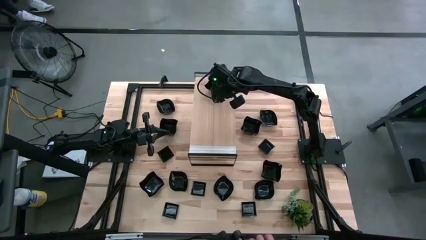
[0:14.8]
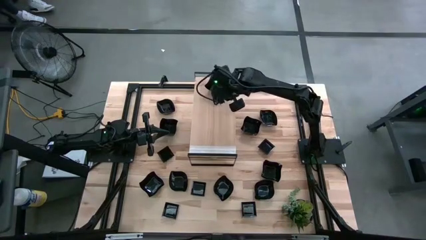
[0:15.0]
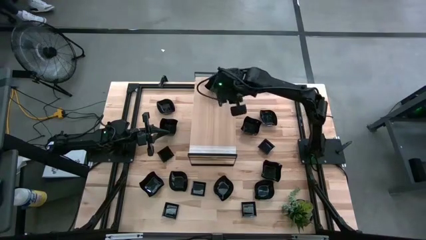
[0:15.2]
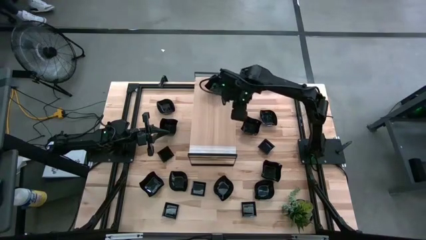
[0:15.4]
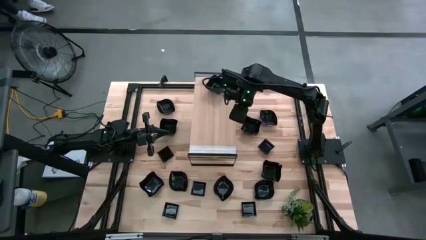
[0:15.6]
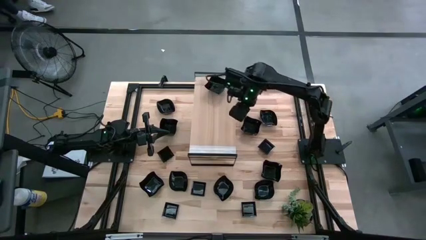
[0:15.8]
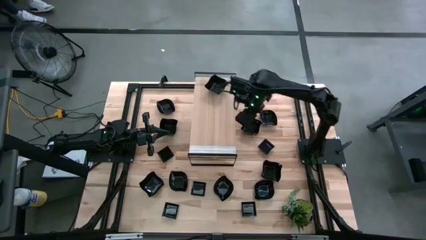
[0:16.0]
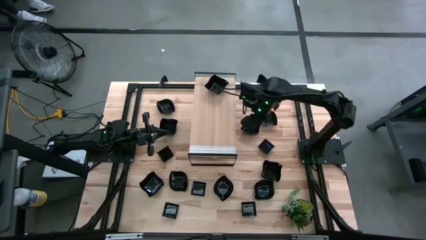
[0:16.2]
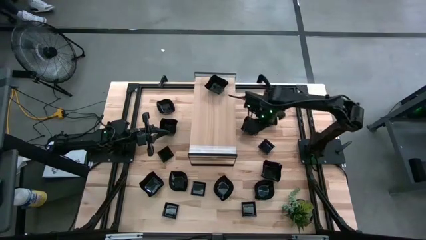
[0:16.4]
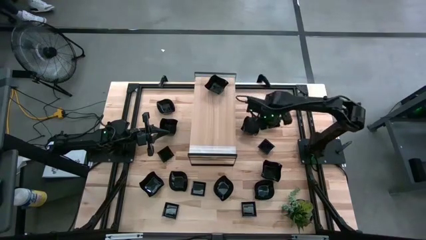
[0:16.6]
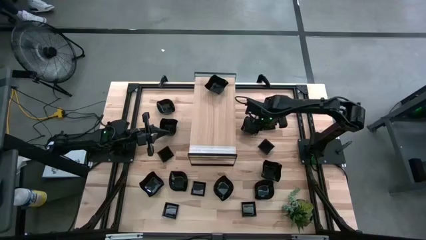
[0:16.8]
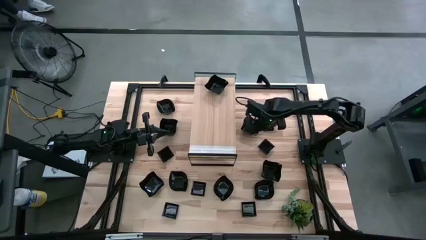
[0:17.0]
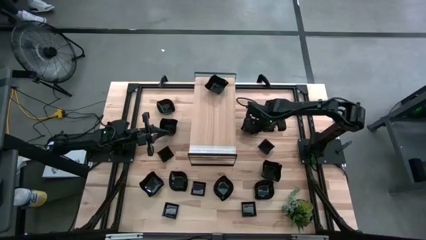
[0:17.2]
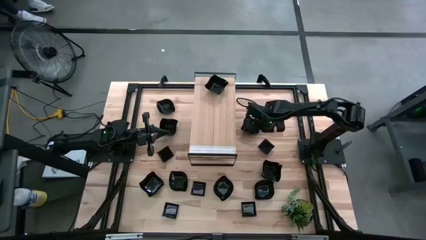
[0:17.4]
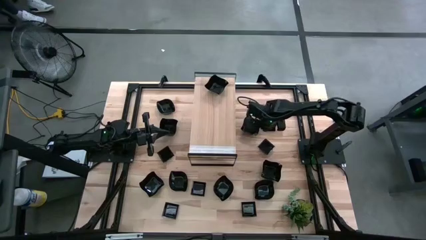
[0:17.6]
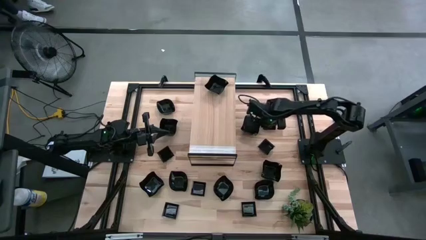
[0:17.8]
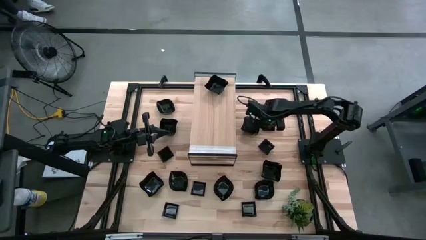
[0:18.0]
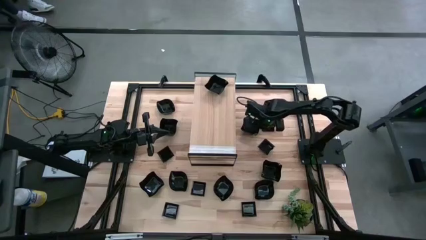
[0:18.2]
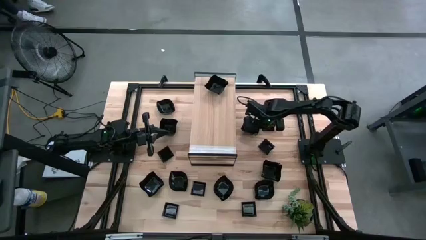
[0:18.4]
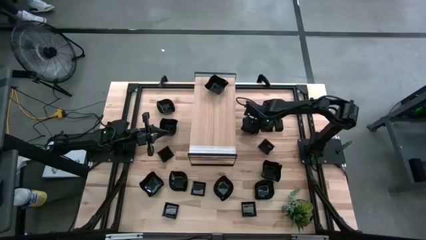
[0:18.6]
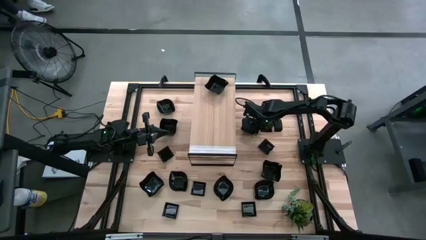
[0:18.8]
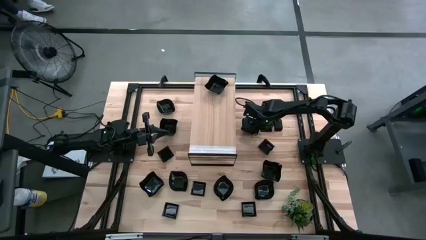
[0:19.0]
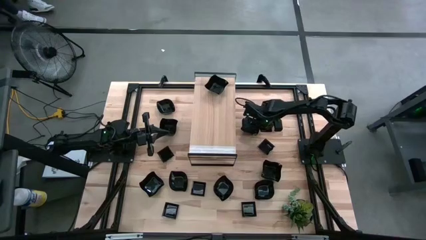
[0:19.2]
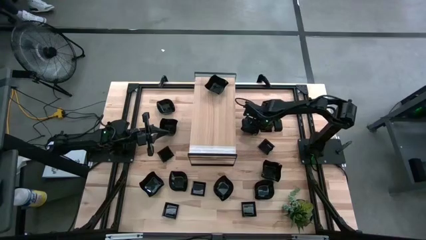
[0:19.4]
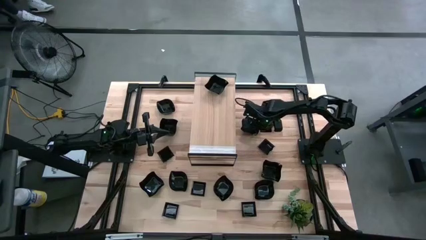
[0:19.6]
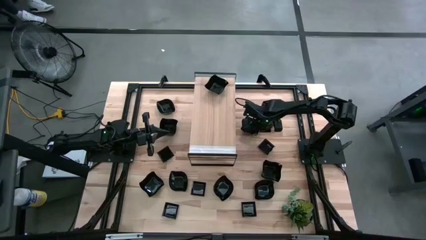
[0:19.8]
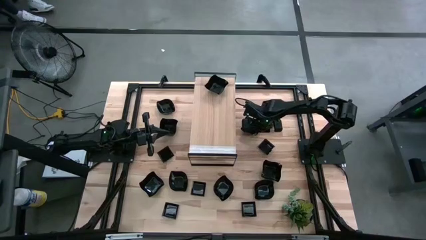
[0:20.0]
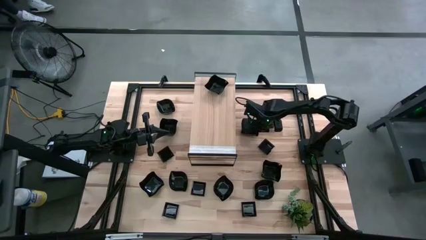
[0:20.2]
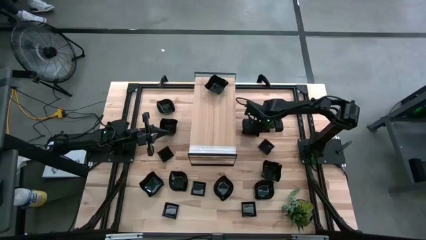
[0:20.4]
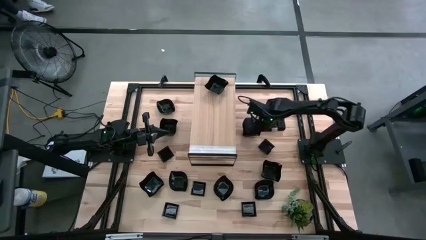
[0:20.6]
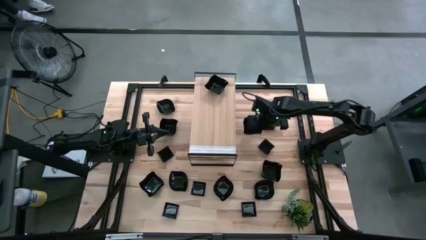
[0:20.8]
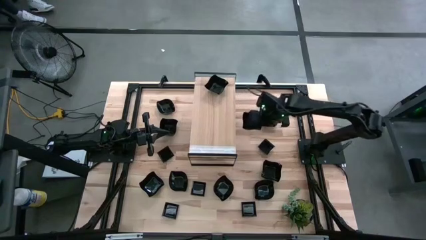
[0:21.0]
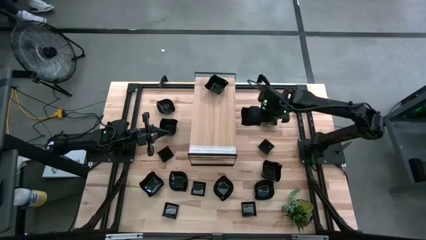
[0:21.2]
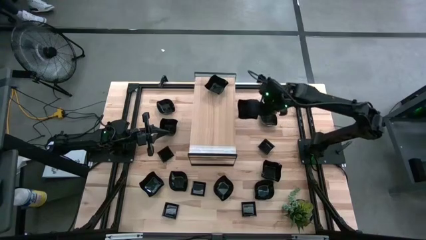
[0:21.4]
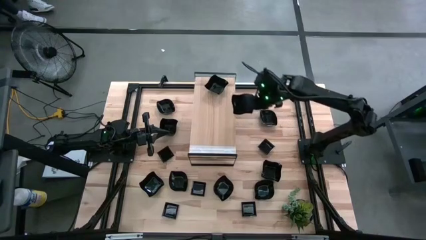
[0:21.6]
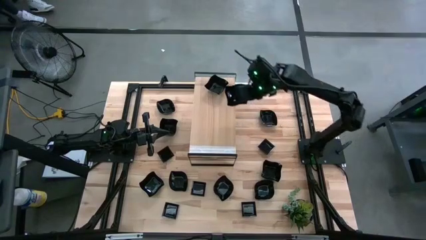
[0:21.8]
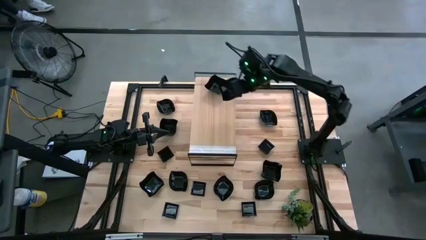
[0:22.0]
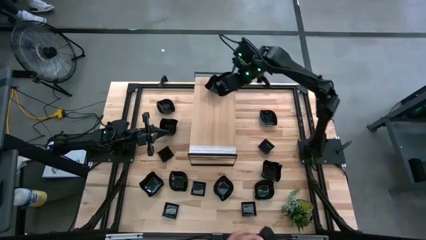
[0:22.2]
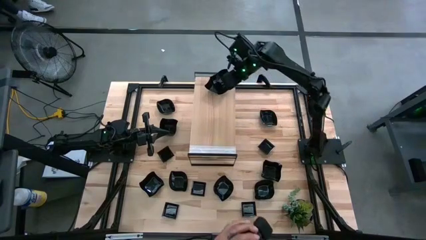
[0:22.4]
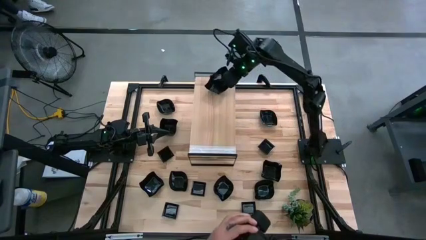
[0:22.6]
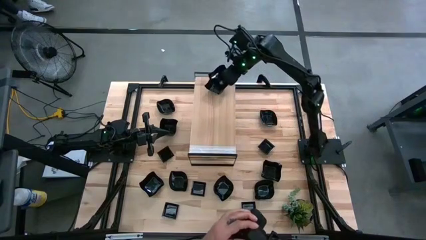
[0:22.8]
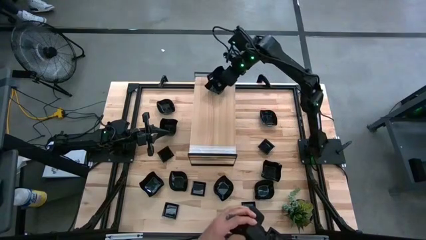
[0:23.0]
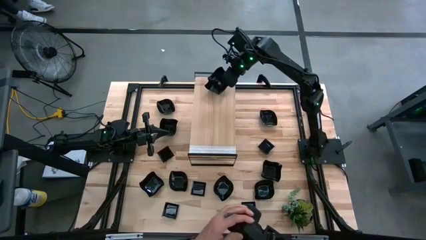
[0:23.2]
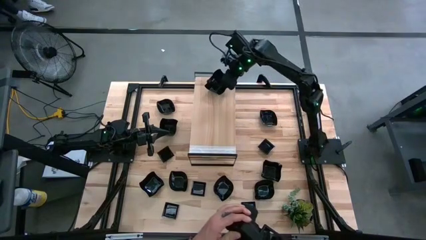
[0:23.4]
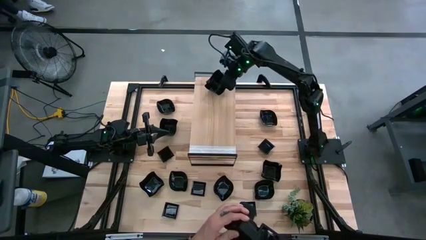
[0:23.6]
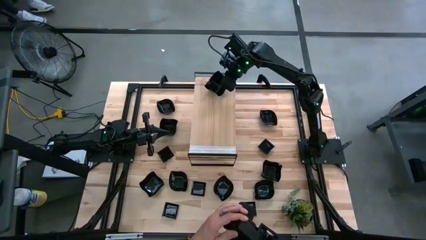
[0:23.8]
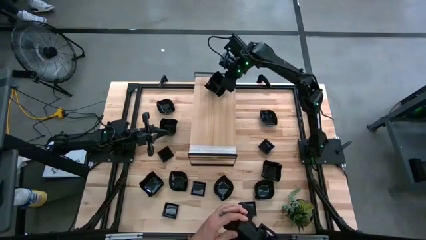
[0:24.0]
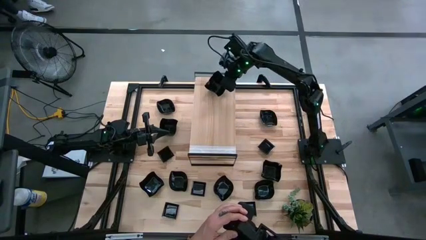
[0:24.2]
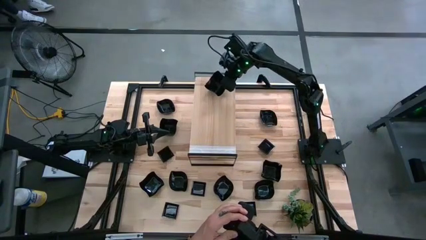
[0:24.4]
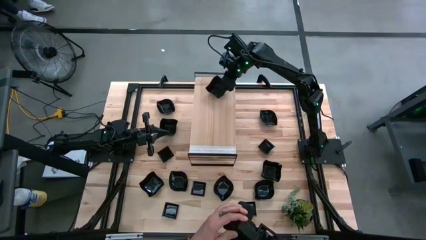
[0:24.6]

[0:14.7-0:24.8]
Task: Pick & Place Mini shaped plates
Stack the distorted square plate on top of the distorted square plate on the shelf

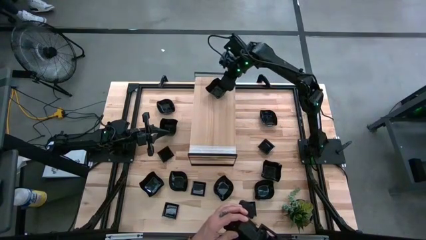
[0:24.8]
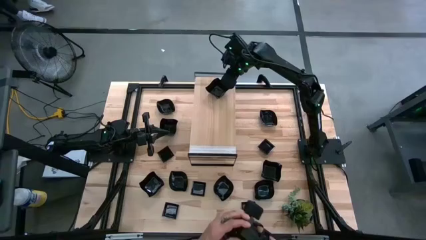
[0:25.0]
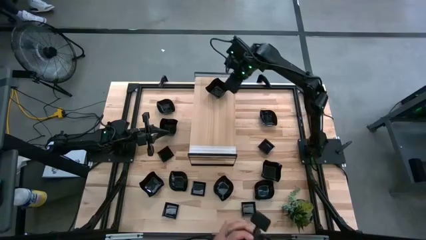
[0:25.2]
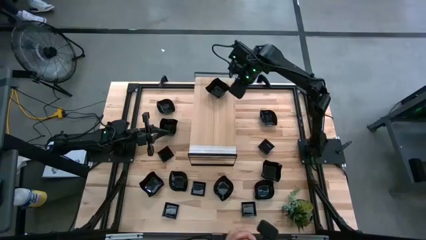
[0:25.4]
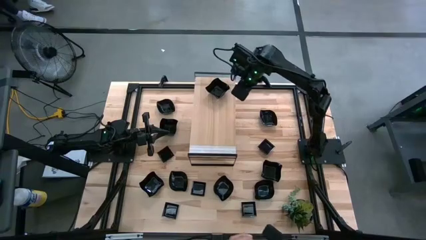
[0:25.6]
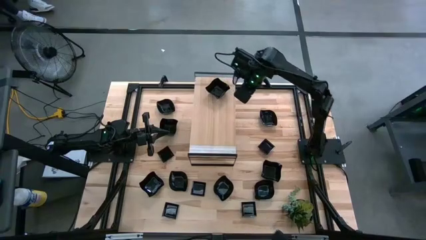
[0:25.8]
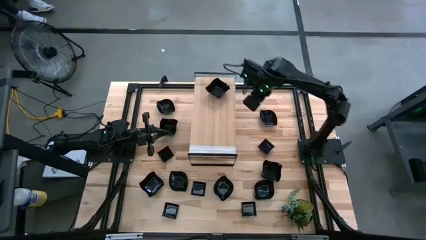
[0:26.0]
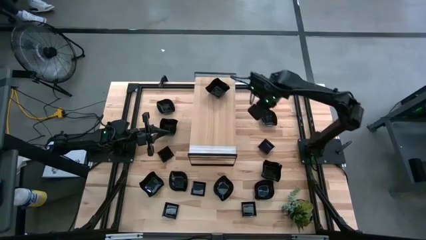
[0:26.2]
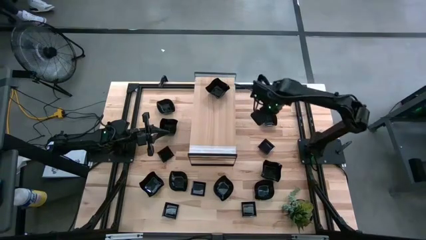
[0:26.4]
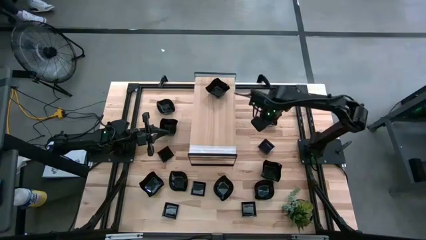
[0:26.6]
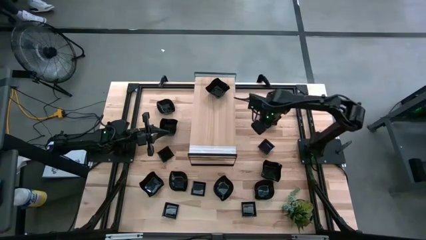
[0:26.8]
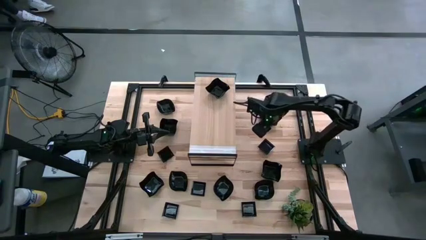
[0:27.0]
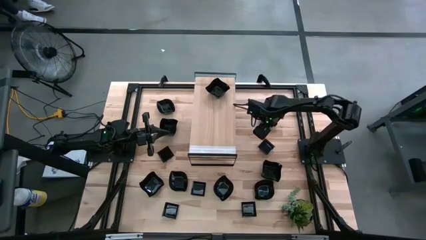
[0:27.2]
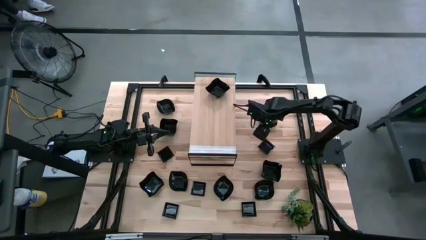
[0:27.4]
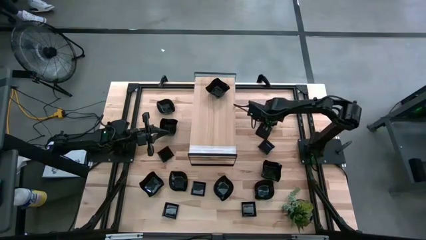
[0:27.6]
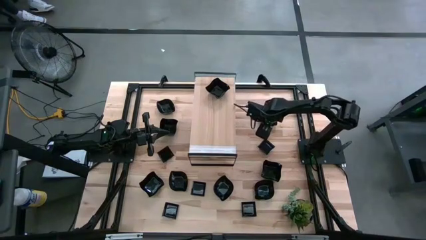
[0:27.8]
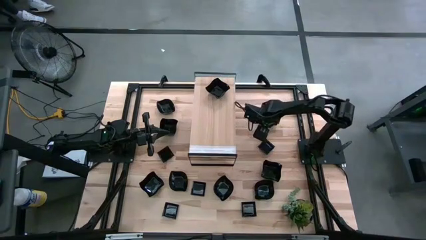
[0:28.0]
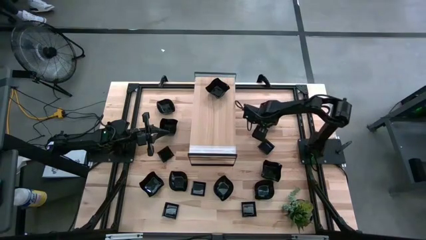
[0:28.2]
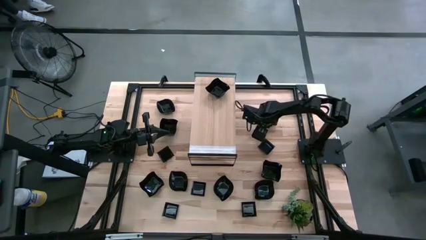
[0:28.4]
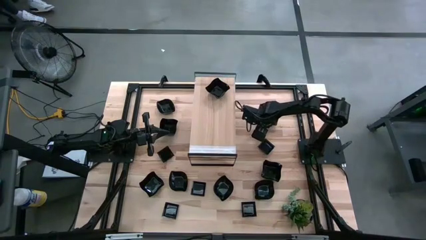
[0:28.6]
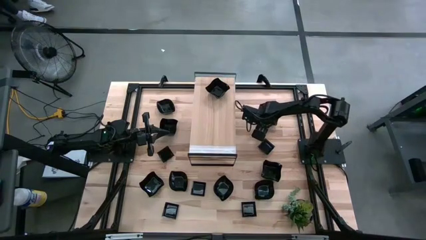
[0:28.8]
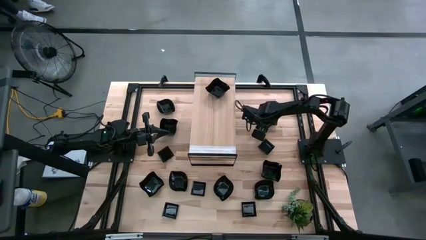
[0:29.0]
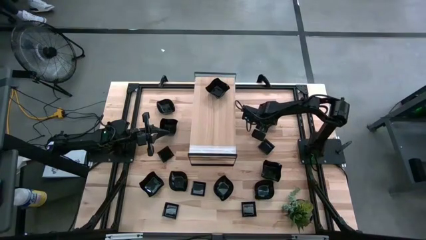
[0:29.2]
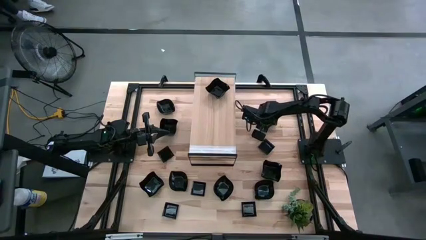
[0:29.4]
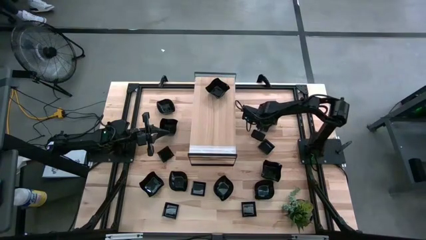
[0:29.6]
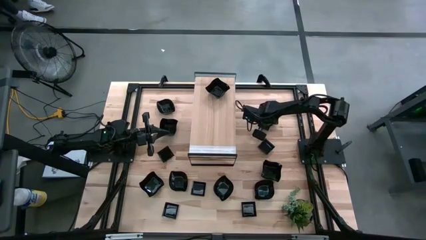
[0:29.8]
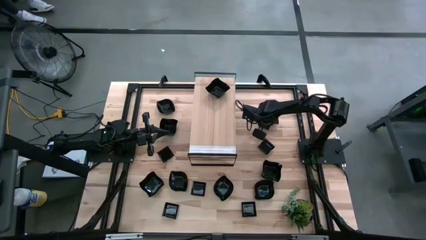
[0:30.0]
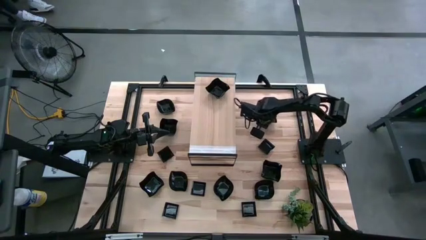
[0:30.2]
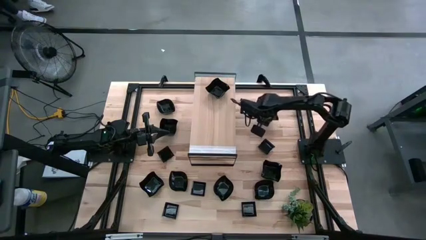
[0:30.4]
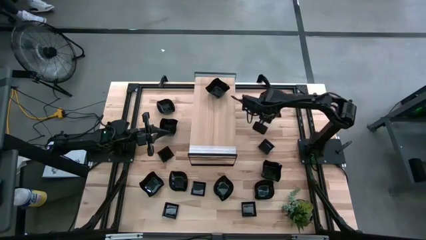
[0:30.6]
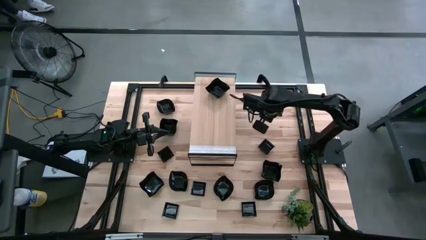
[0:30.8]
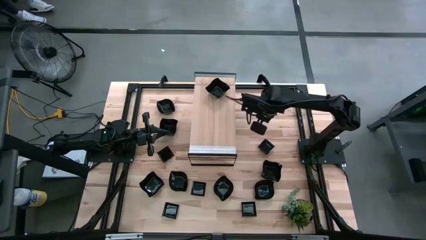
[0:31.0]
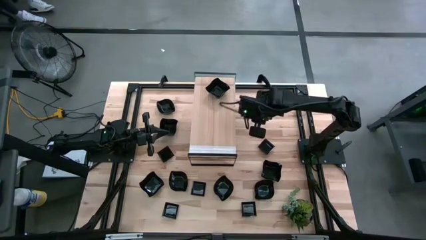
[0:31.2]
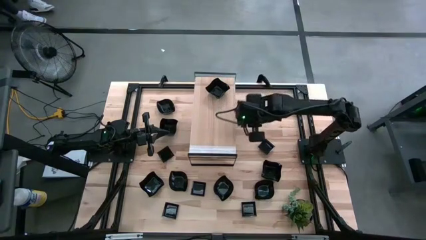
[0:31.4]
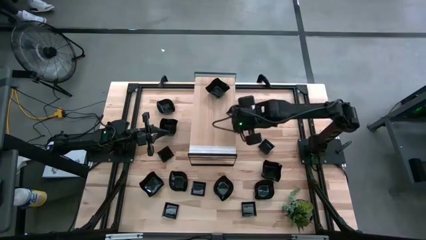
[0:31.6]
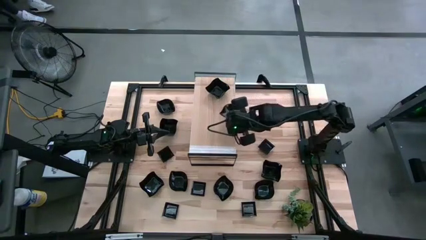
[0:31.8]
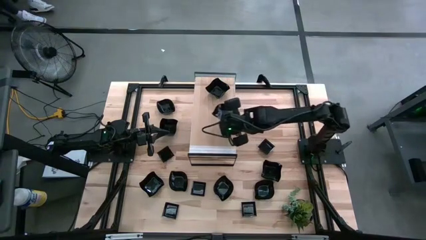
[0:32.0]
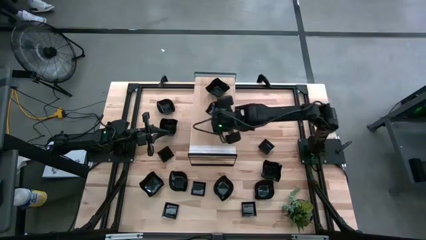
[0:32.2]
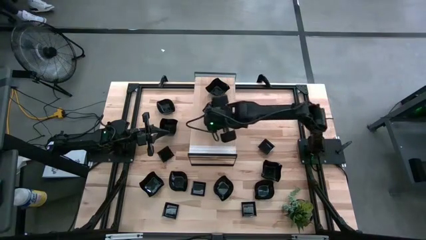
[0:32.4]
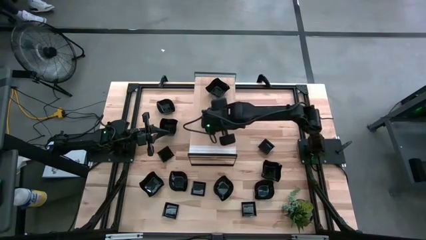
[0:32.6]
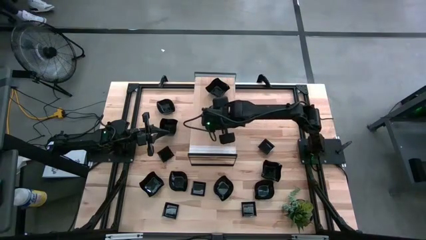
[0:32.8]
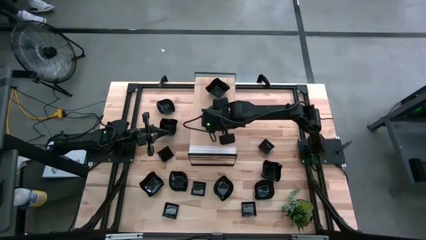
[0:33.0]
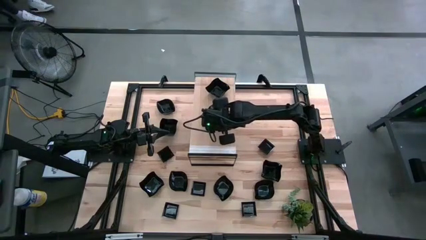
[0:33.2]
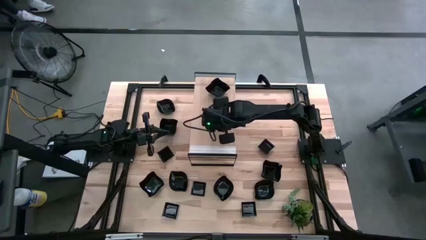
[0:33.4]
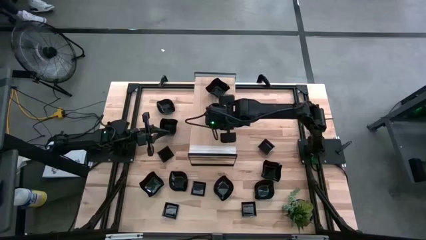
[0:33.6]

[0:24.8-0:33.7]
Put the leaf-shaped plate on the shelf
